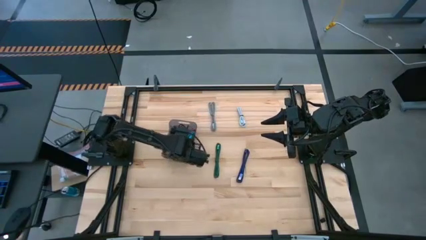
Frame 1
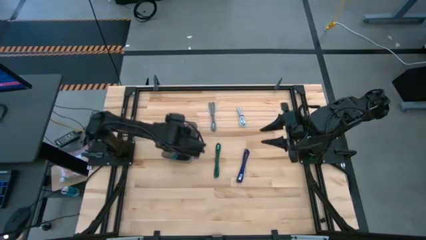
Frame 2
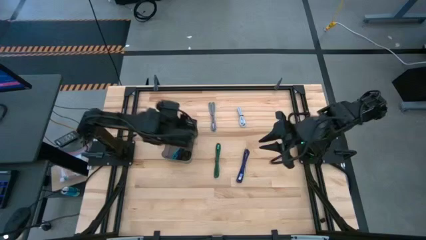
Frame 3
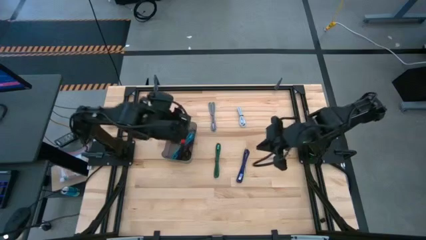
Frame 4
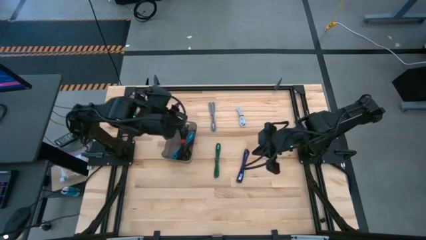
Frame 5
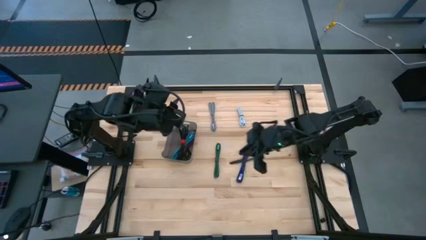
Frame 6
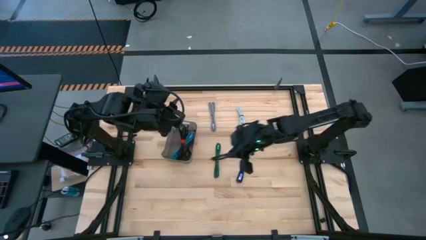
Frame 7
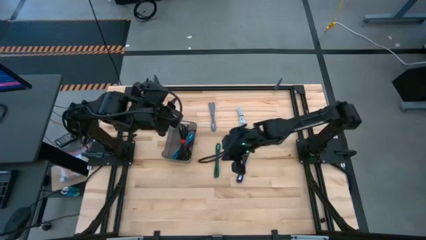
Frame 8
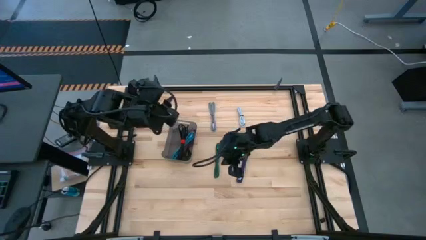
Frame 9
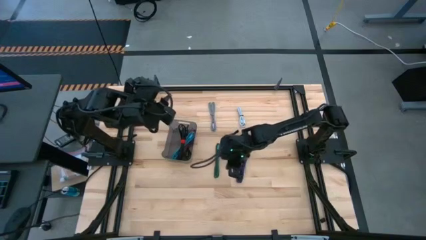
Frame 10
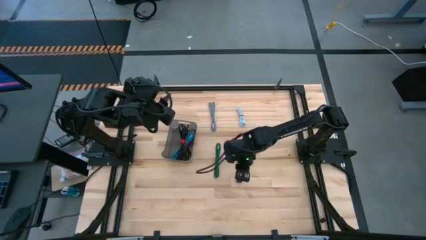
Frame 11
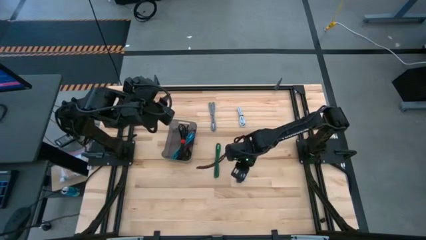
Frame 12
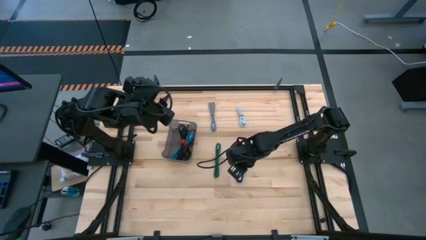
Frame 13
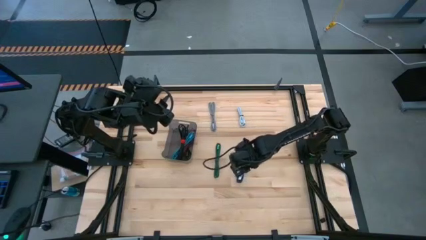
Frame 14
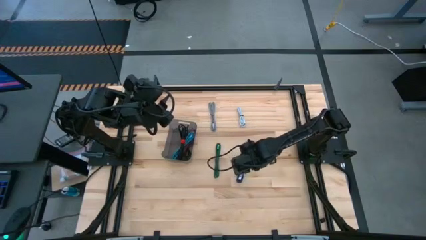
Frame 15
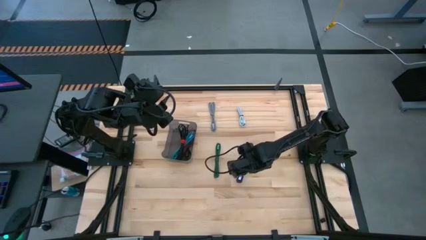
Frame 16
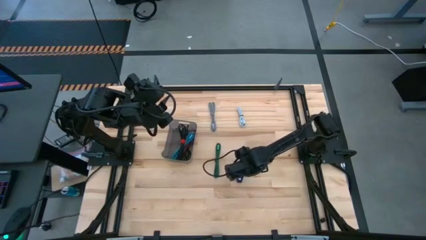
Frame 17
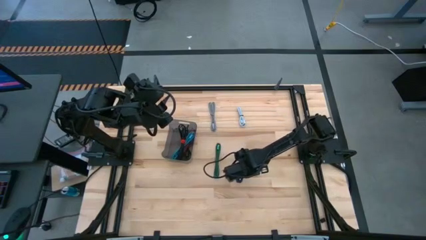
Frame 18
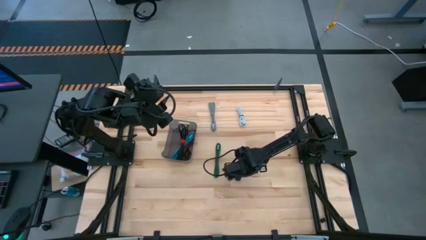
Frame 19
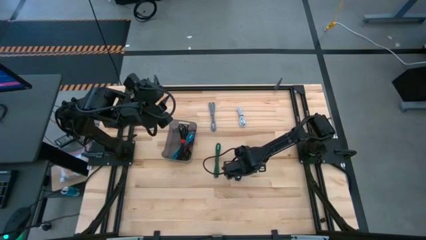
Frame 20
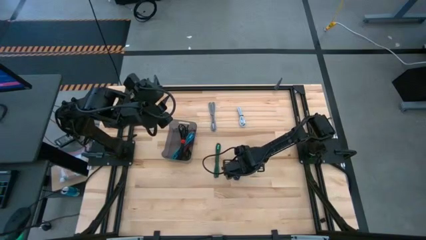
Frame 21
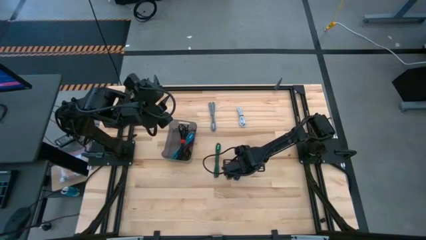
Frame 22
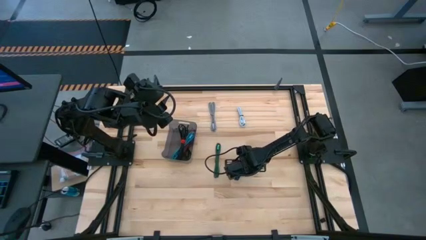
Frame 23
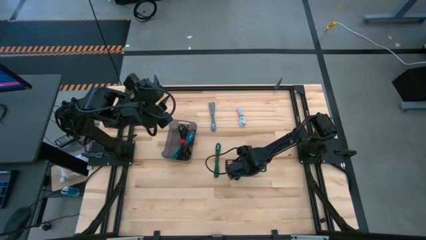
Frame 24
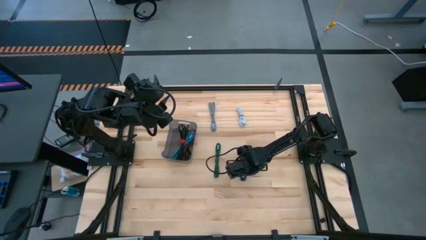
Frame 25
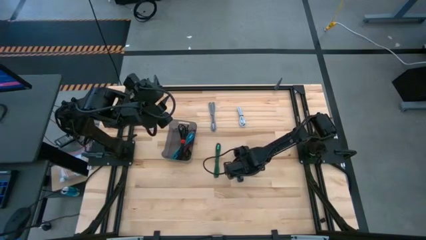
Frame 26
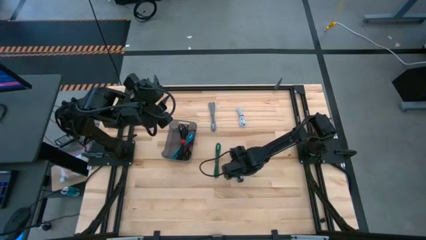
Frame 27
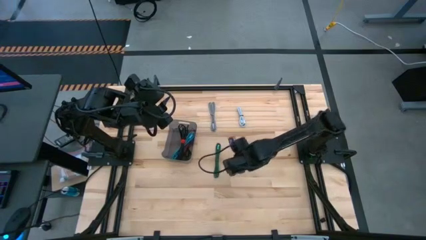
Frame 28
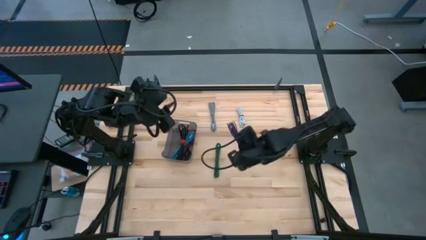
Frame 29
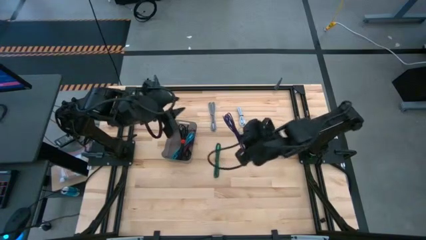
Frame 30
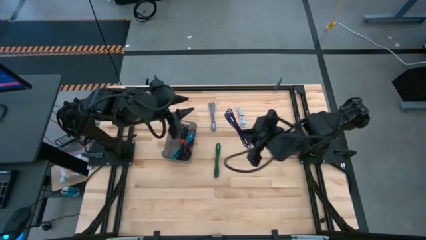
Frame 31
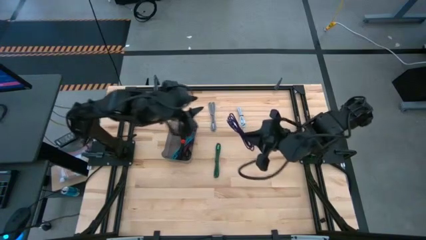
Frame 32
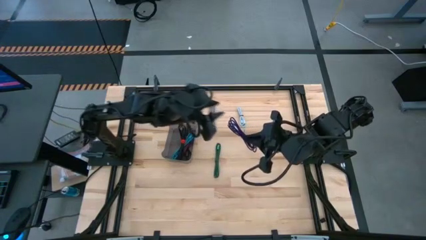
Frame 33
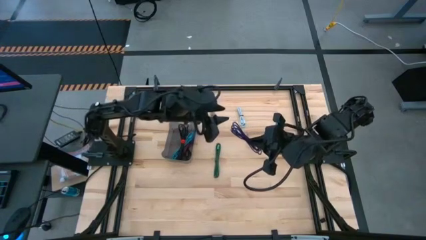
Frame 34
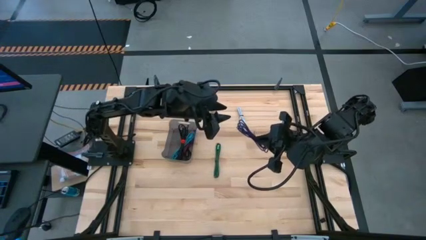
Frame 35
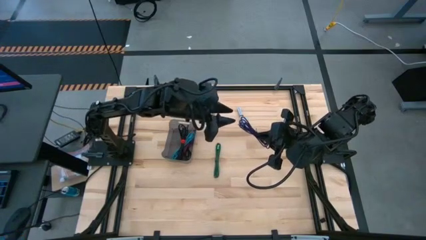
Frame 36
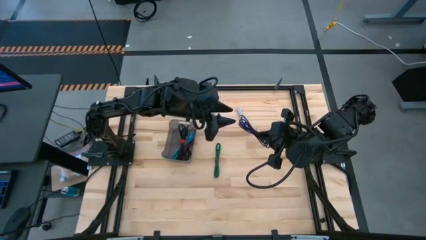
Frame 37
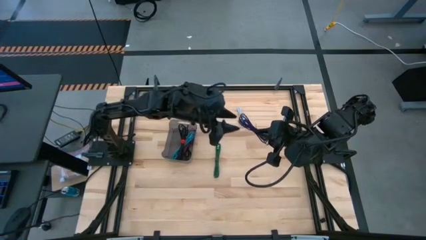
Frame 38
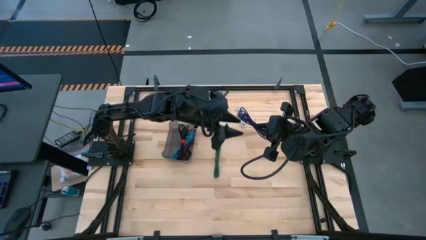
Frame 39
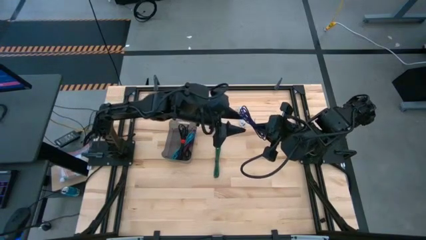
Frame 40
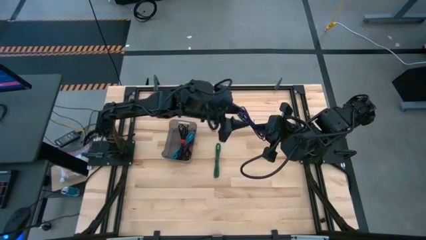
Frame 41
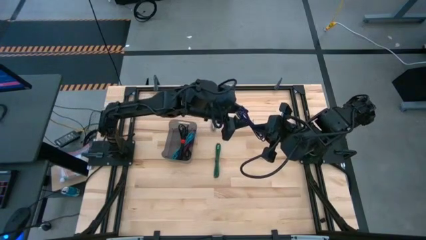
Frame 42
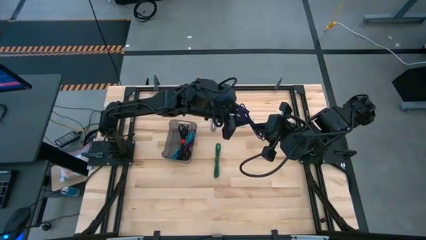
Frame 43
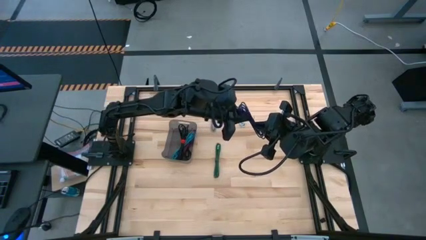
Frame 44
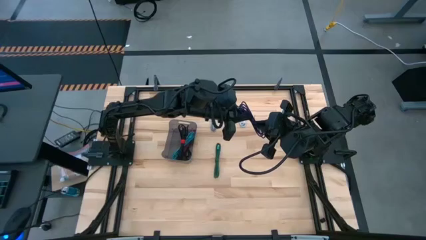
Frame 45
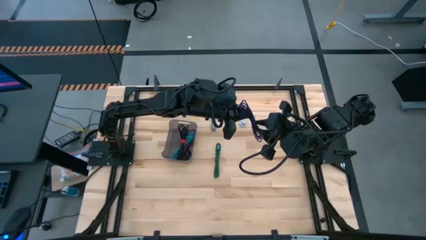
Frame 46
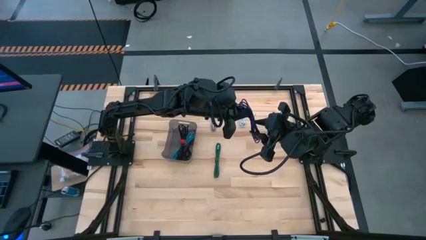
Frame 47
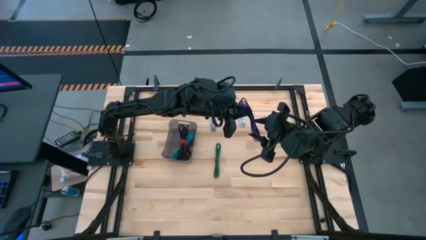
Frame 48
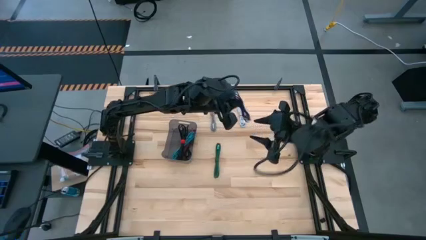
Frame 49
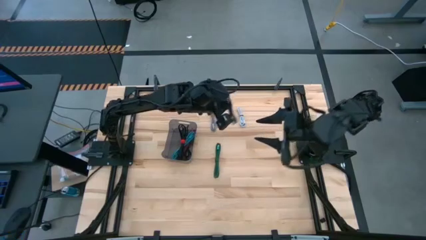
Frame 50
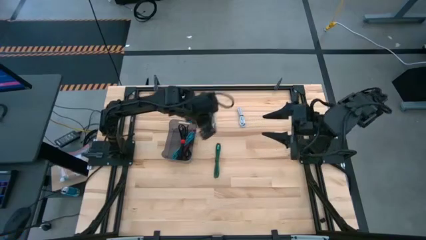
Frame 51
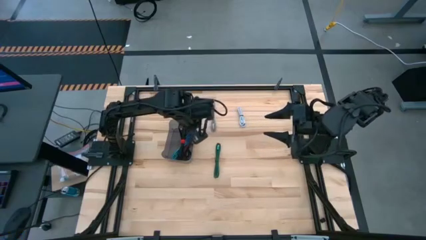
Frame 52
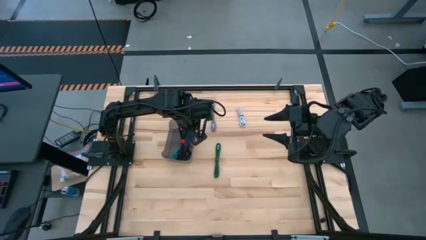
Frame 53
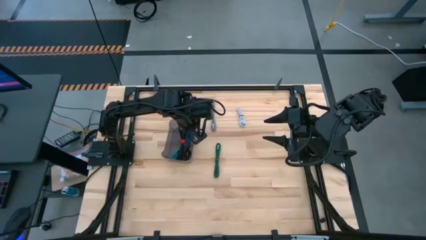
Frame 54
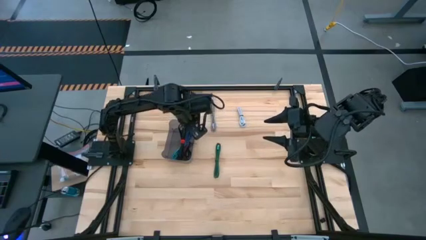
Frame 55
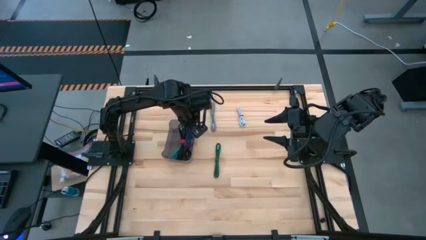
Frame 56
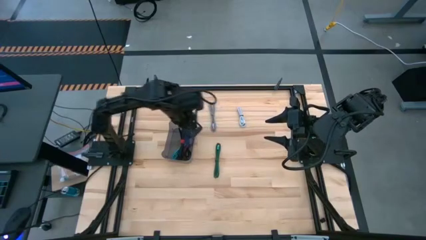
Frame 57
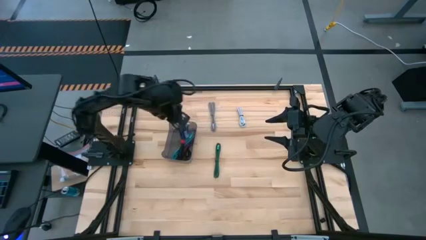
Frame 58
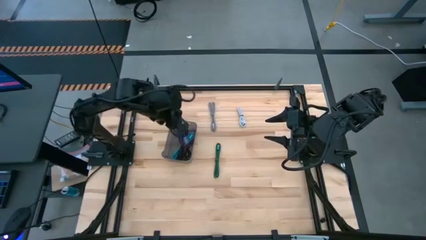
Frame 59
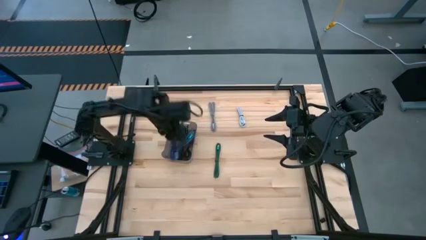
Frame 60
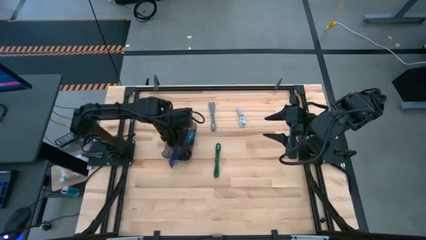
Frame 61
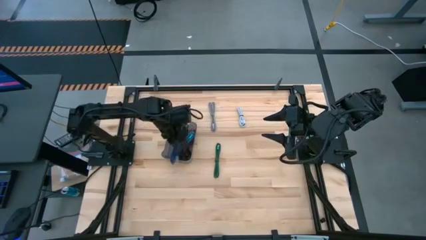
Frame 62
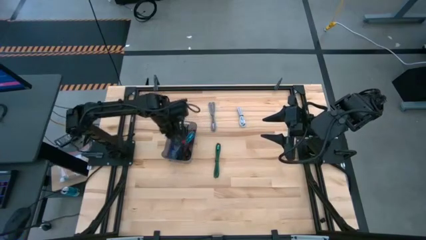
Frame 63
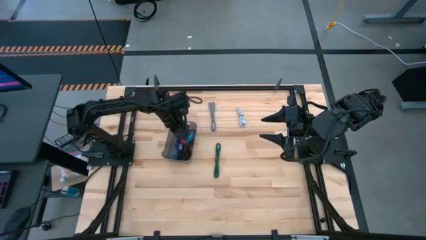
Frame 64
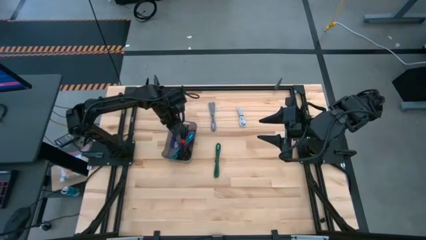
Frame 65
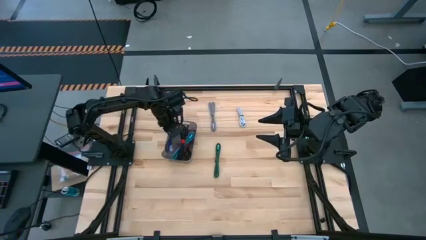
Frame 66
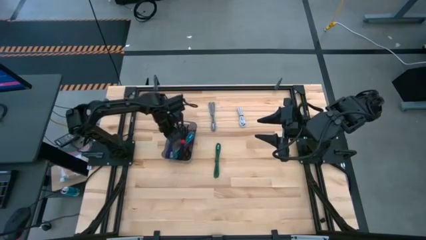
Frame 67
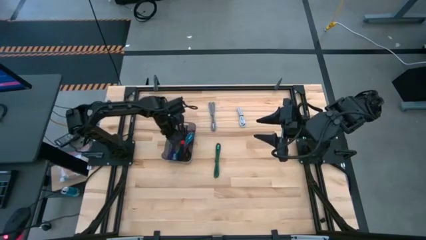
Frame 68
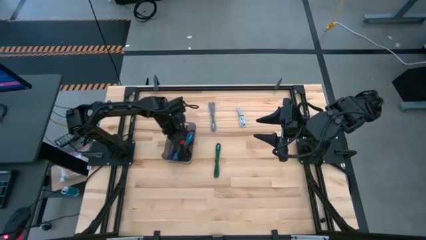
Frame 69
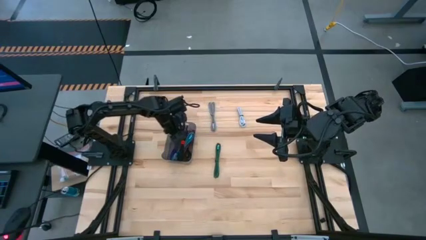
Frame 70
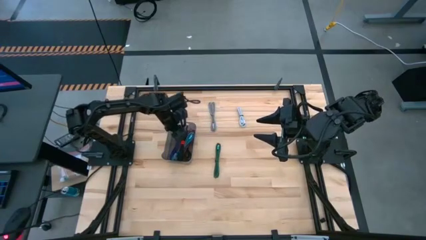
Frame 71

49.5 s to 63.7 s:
Task: Pick and place USB-C Cables
Put the dark blue USB cable into the black bin
